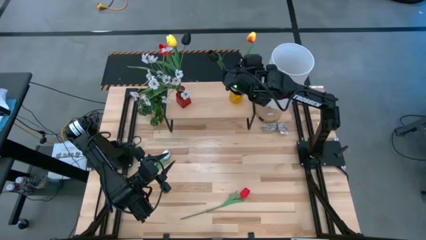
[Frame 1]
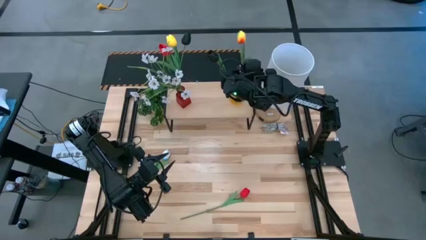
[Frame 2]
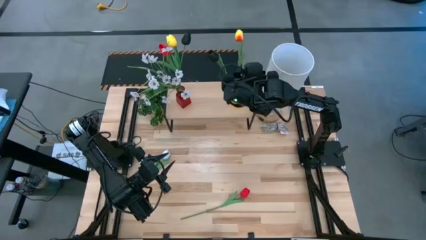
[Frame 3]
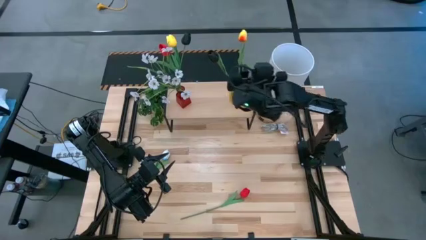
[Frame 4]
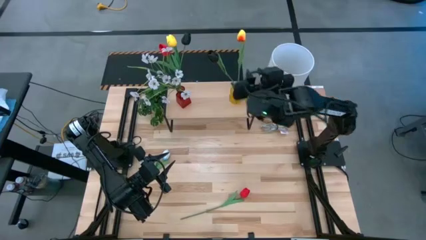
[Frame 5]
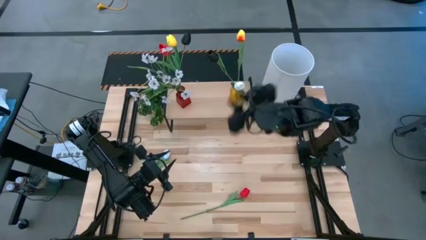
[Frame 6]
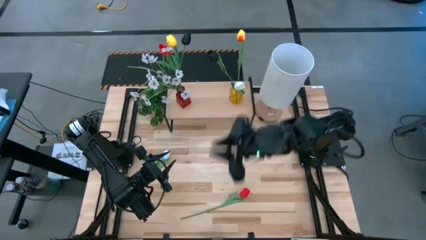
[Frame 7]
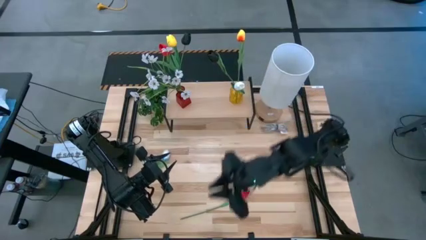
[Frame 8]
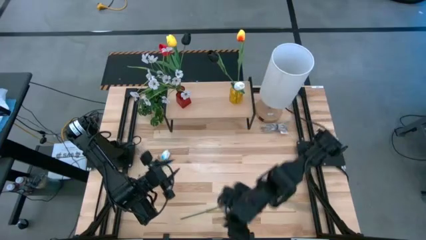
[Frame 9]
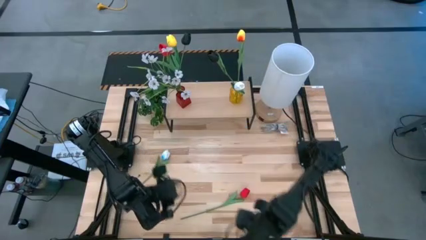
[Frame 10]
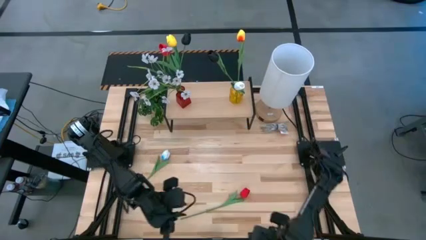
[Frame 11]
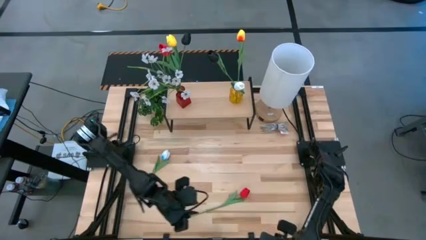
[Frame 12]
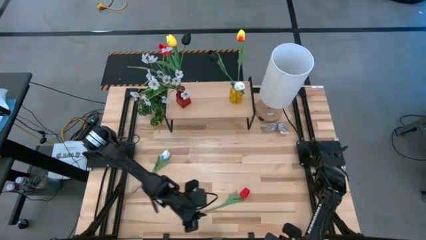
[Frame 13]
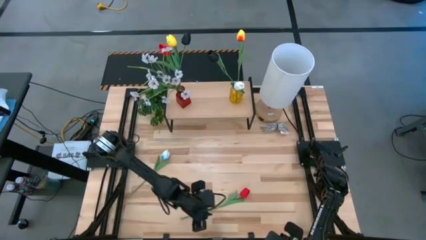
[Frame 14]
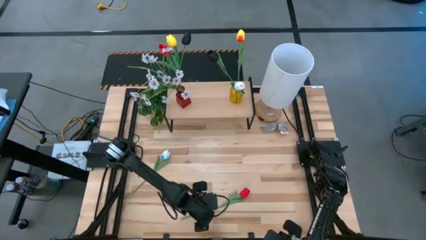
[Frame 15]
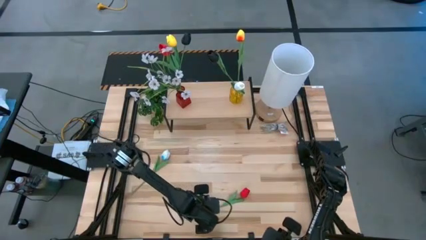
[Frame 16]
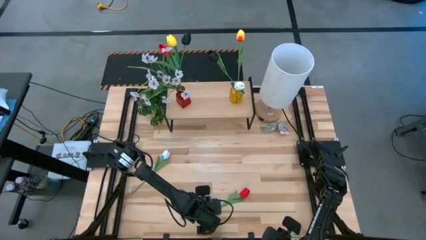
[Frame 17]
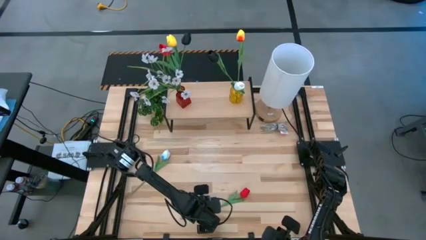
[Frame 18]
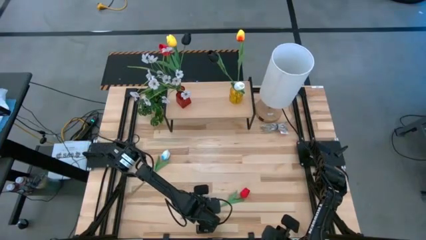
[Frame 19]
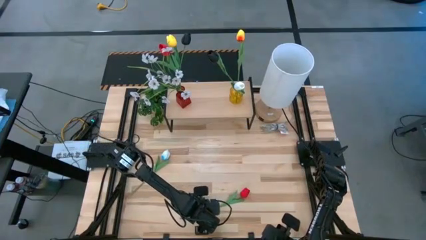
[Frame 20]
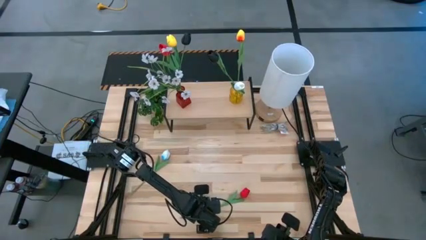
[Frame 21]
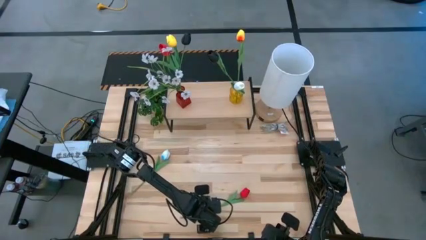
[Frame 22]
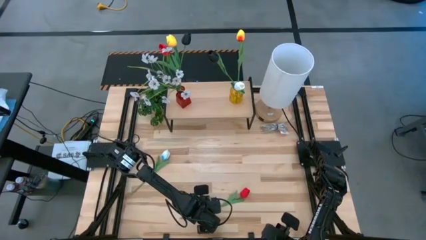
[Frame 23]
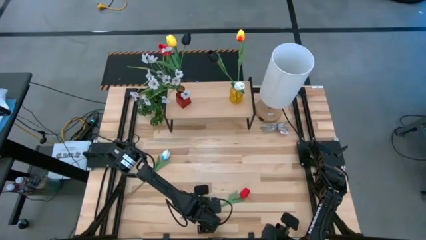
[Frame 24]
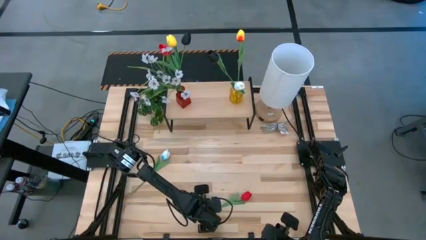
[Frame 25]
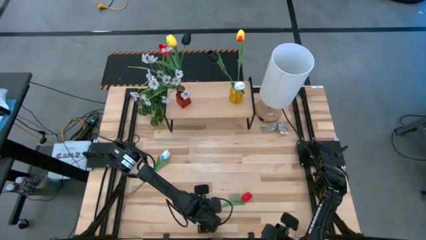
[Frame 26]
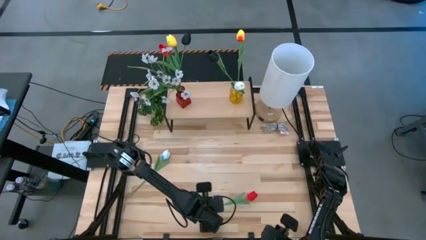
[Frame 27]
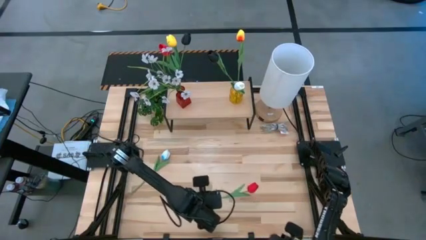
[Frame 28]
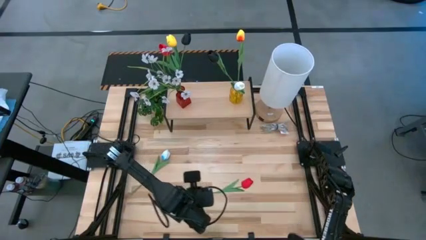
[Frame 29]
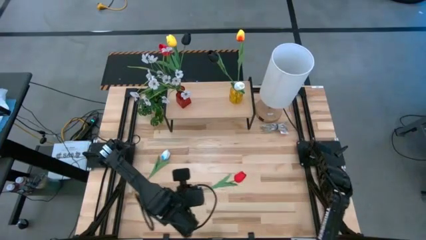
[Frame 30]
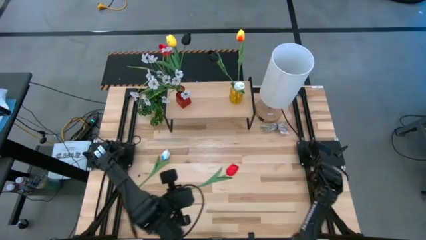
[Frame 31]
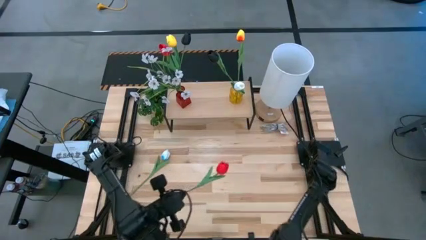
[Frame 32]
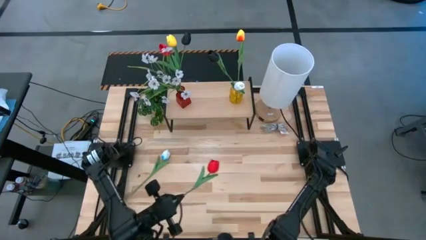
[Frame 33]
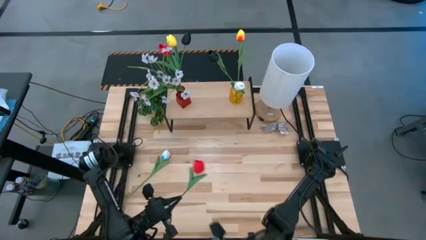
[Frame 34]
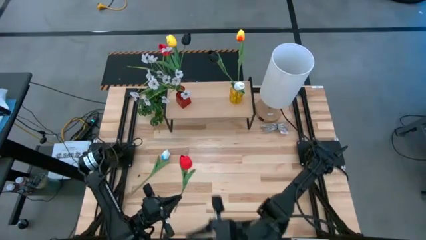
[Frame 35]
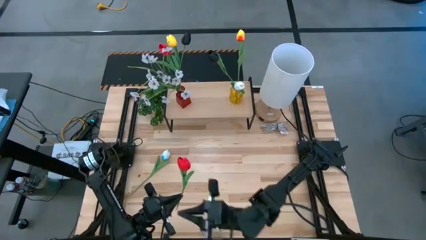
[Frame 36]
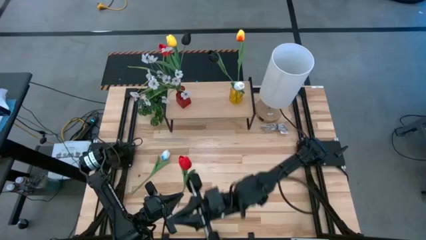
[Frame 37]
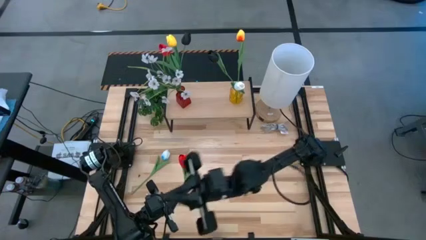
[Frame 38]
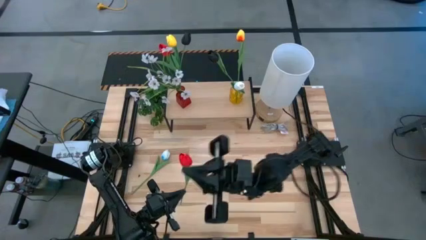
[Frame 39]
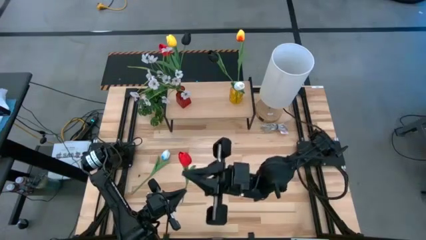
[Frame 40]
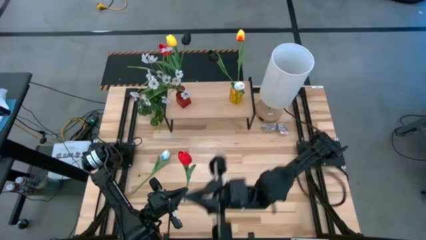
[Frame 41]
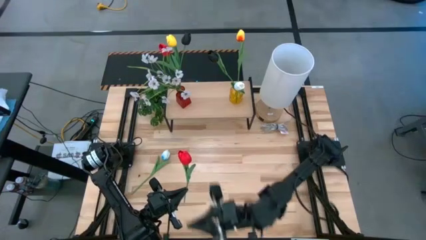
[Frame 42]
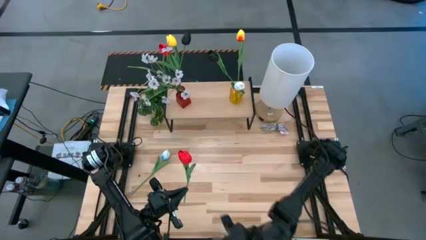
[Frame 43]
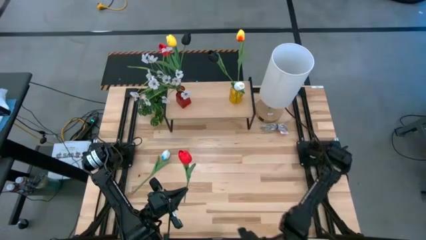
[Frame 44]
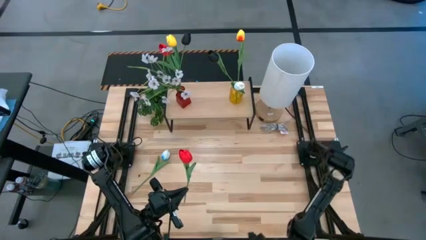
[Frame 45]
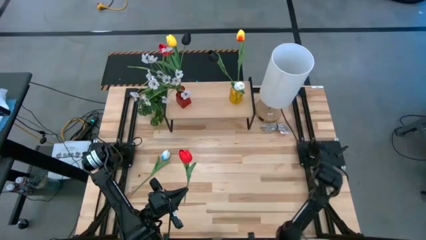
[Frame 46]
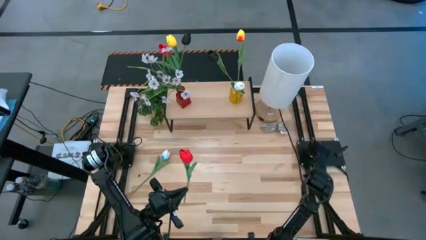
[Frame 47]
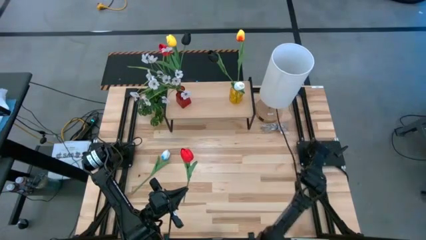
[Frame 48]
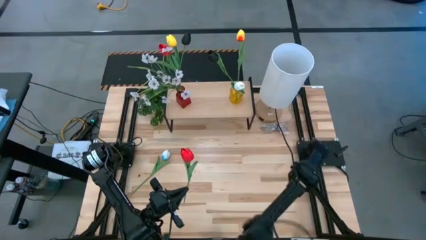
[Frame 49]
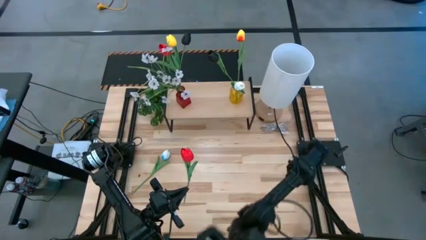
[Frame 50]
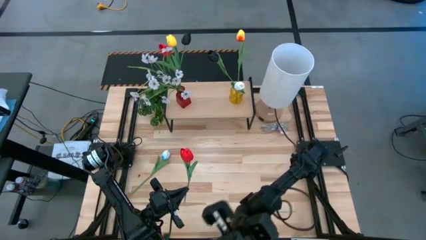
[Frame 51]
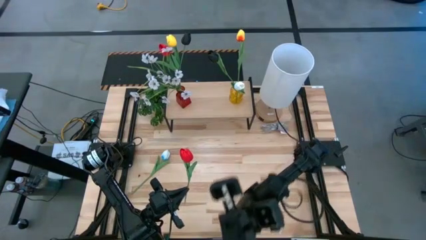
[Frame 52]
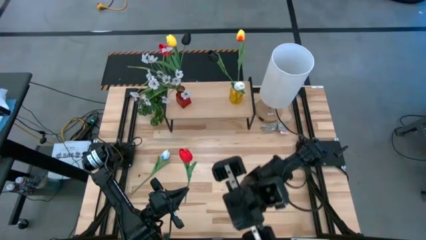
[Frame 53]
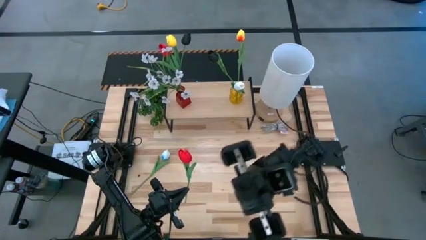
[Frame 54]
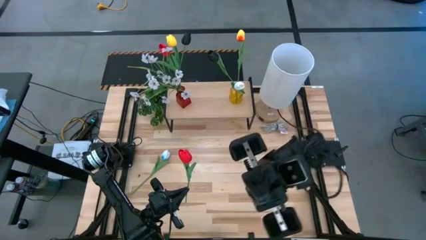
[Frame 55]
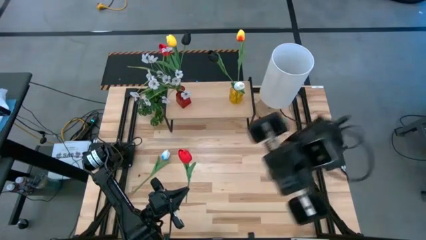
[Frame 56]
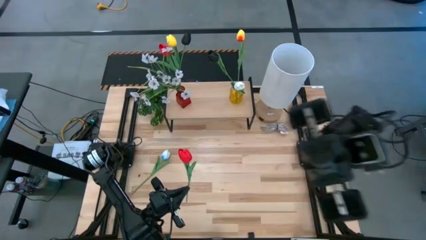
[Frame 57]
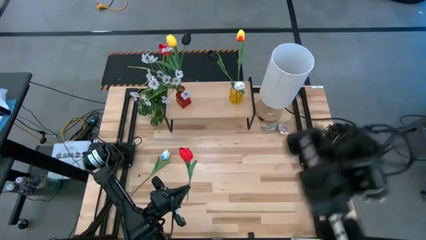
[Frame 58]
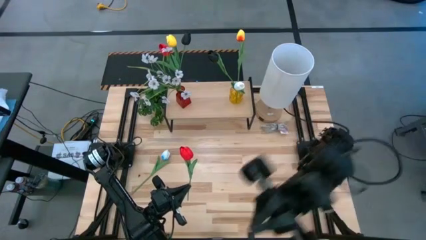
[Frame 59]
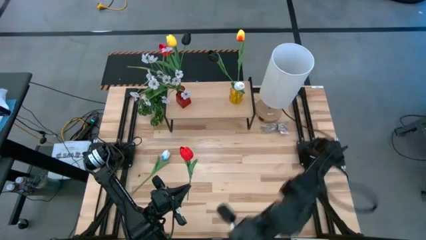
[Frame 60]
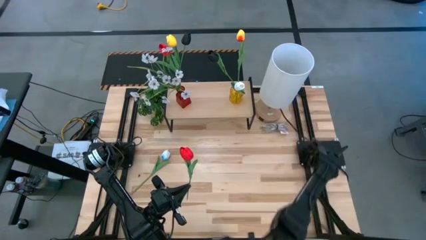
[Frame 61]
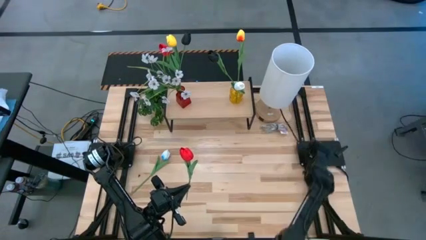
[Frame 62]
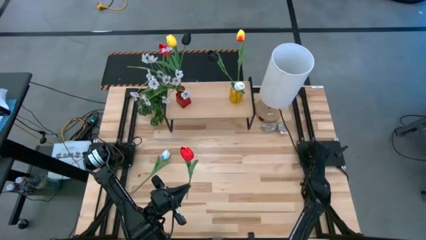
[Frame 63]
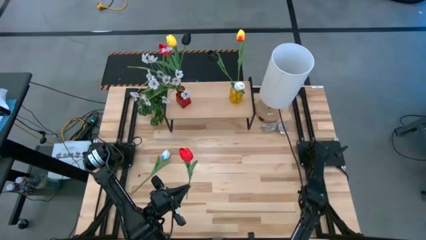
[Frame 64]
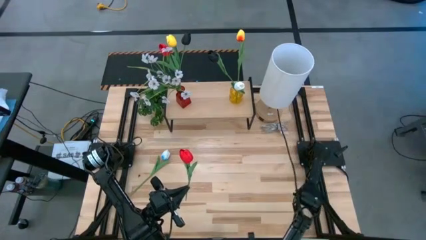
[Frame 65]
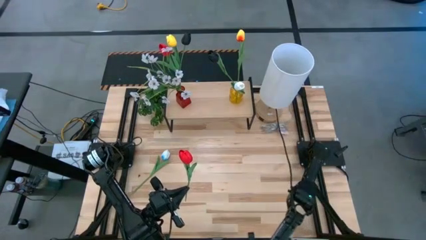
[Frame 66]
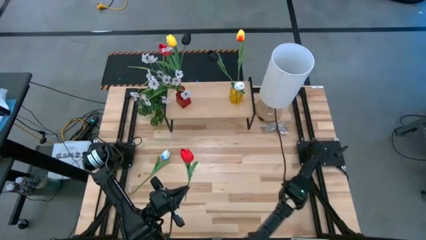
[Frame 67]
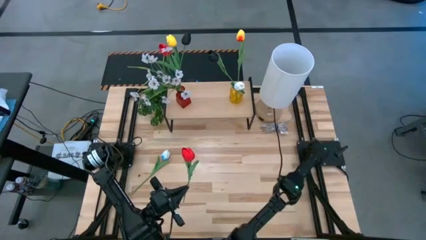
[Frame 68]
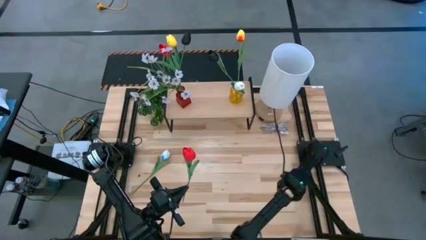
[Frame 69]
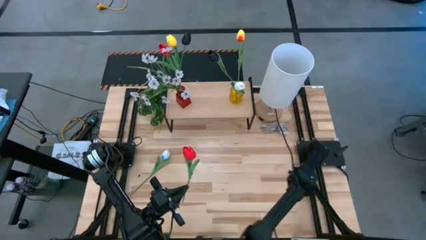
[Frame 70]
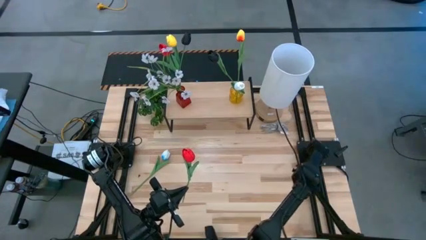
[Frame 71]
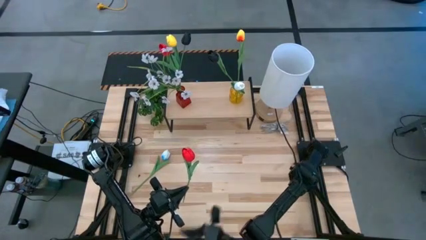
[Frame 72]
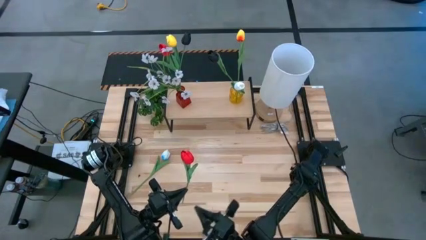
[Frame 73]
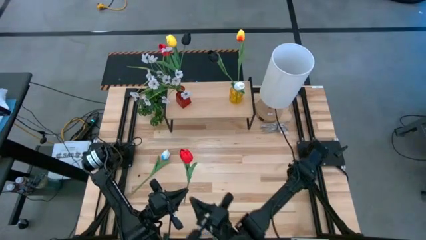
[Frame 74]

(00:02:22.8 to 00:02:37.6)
Task: Pick and place flowers into a vace then onto a shelf
Put the red flower into the yellow vase on the shelf
